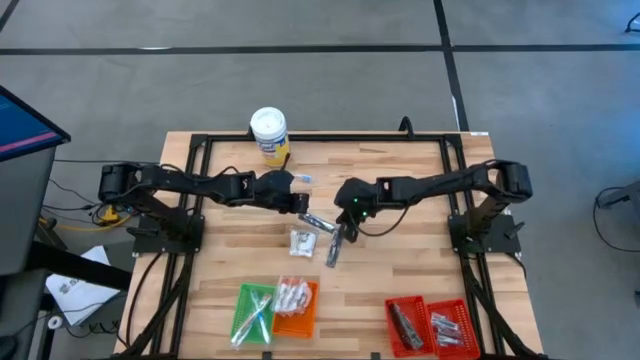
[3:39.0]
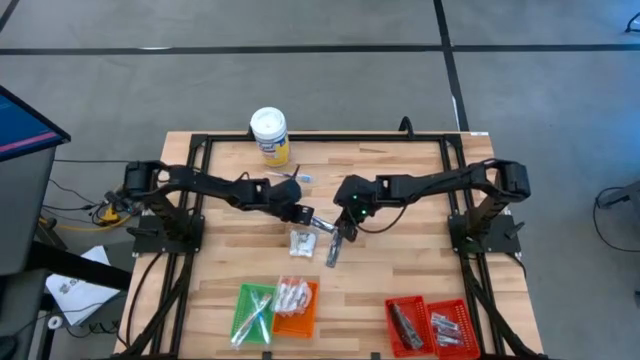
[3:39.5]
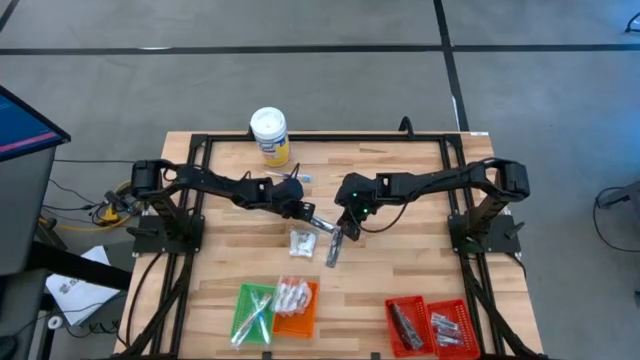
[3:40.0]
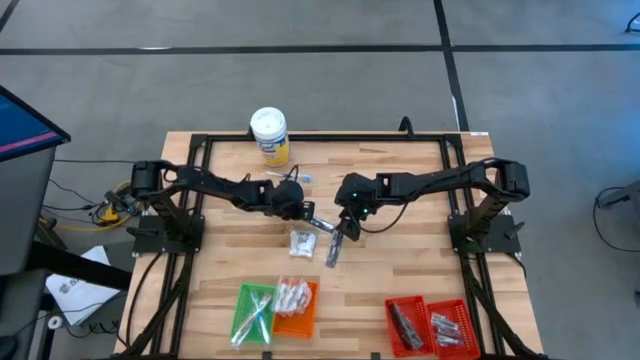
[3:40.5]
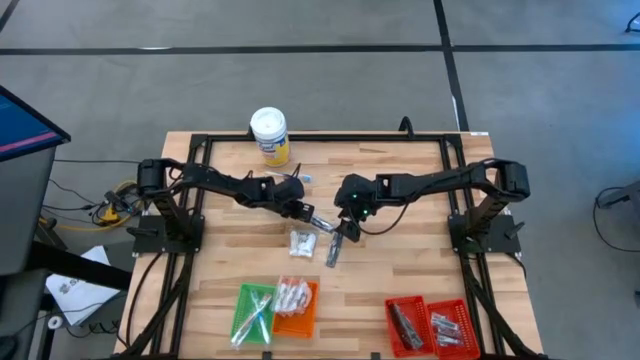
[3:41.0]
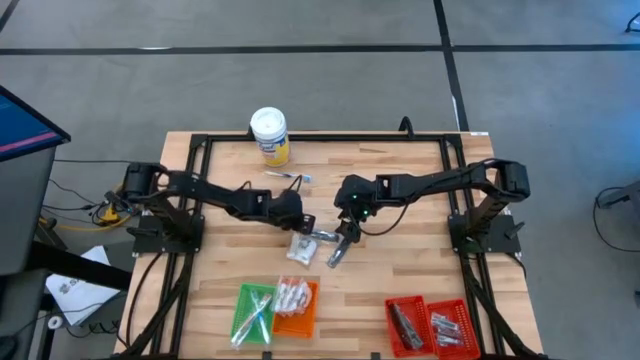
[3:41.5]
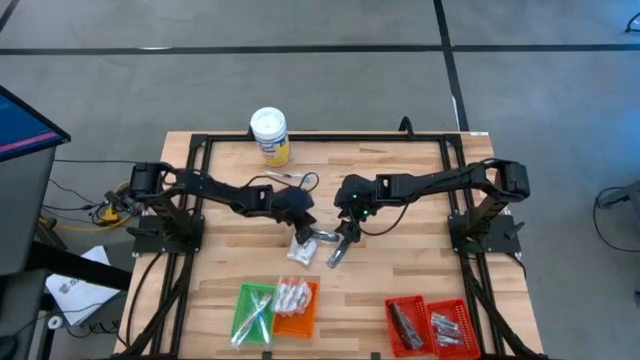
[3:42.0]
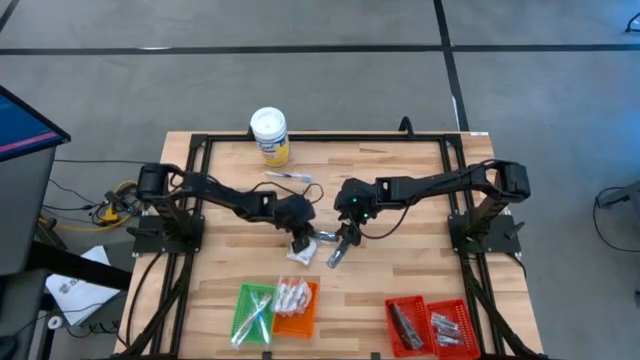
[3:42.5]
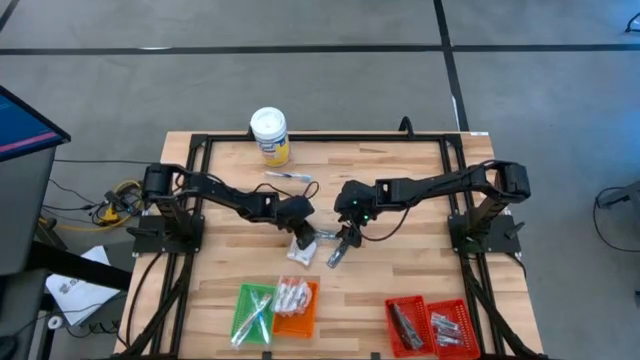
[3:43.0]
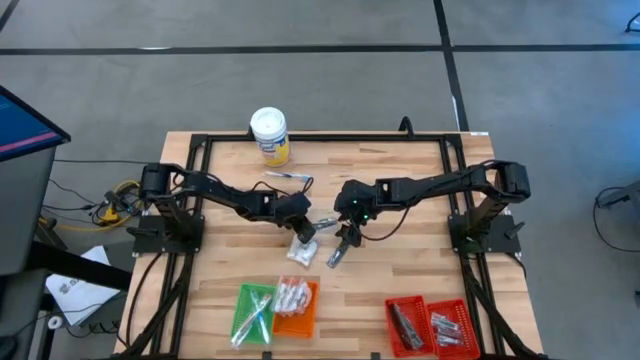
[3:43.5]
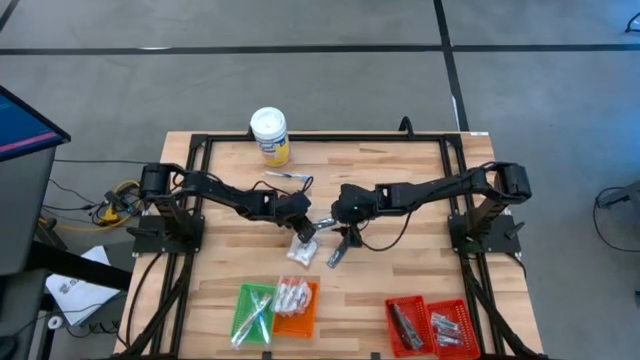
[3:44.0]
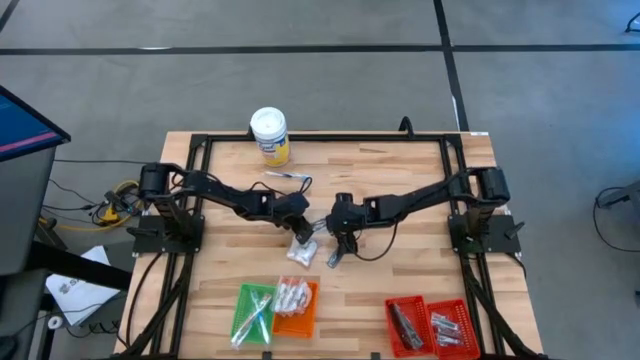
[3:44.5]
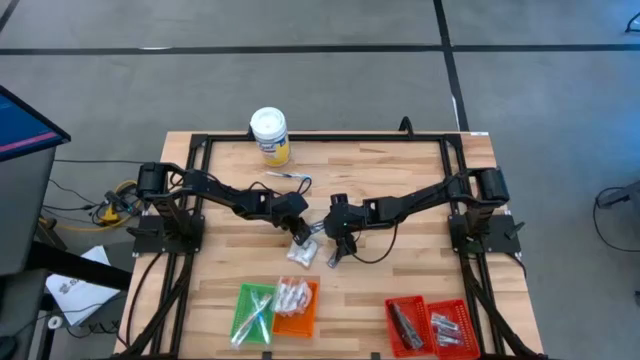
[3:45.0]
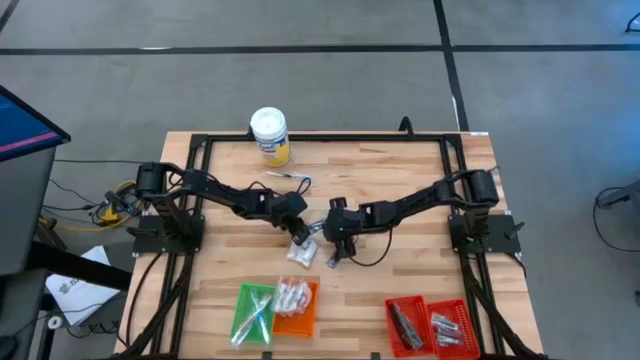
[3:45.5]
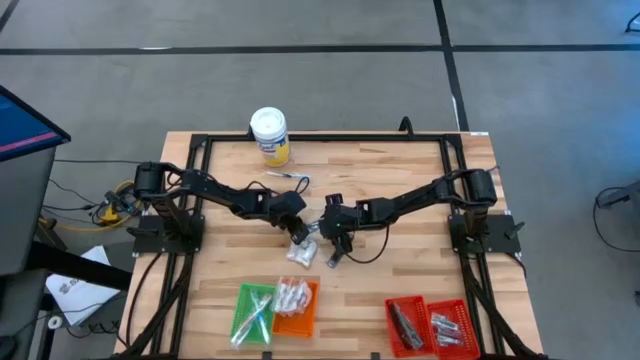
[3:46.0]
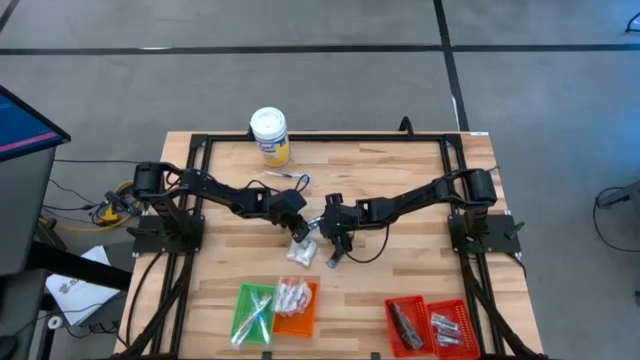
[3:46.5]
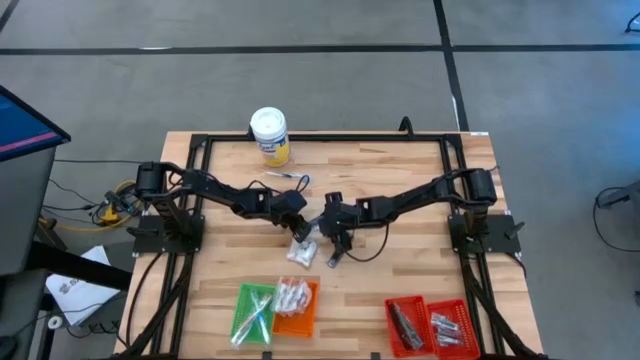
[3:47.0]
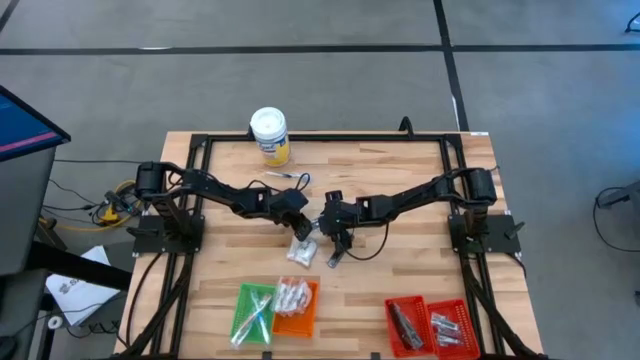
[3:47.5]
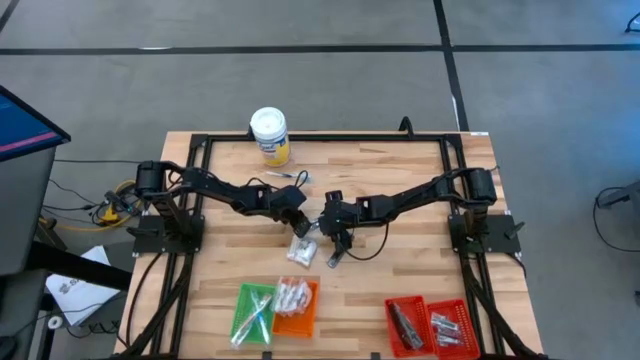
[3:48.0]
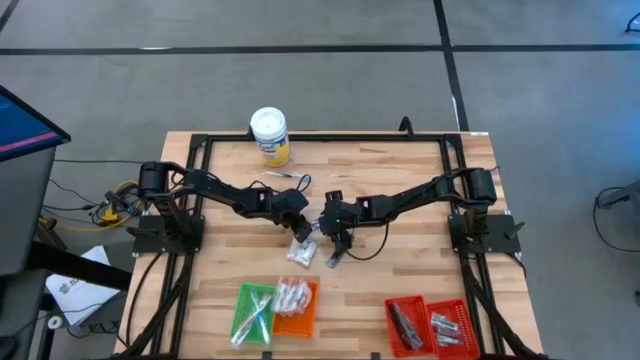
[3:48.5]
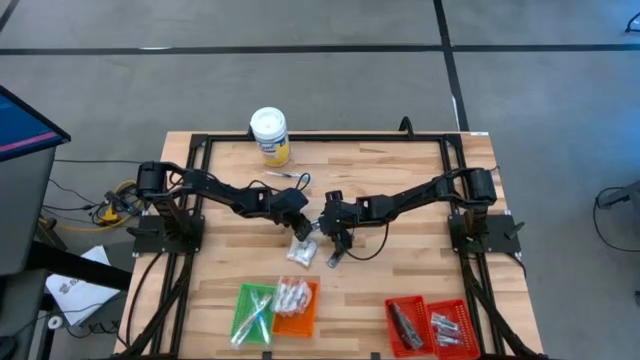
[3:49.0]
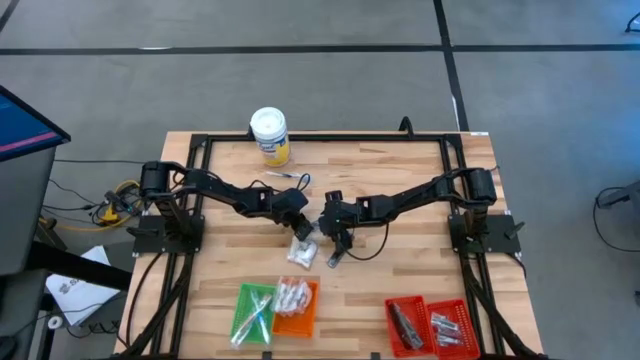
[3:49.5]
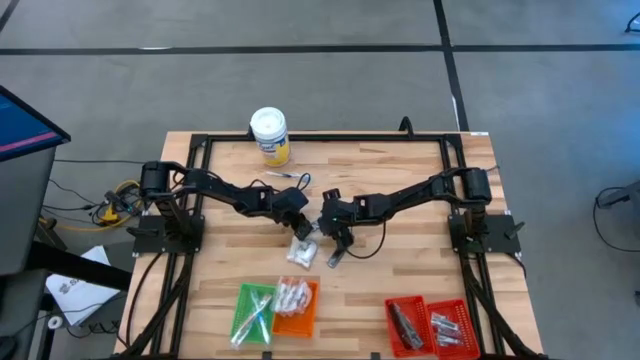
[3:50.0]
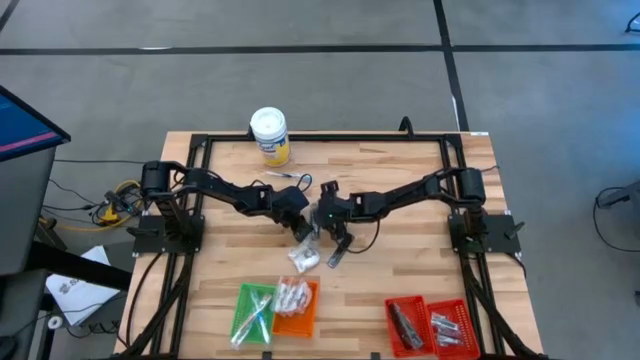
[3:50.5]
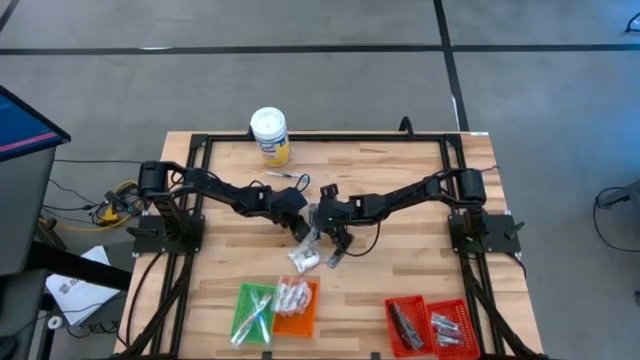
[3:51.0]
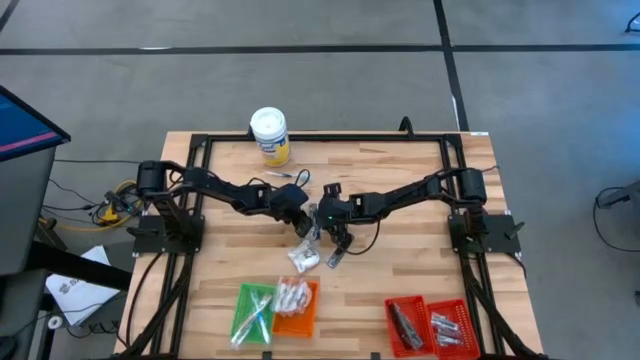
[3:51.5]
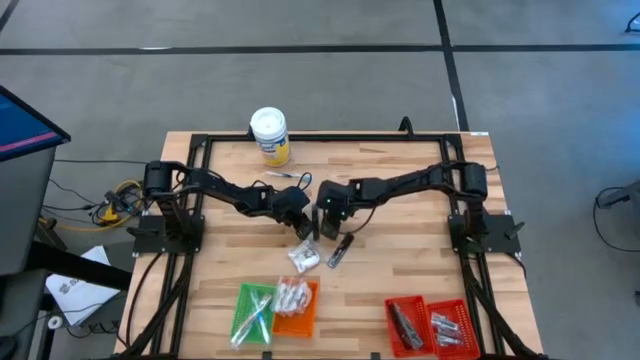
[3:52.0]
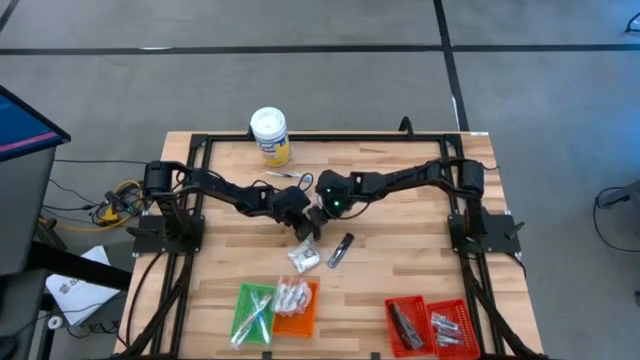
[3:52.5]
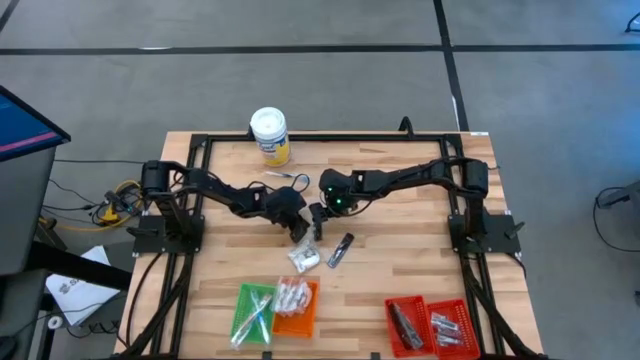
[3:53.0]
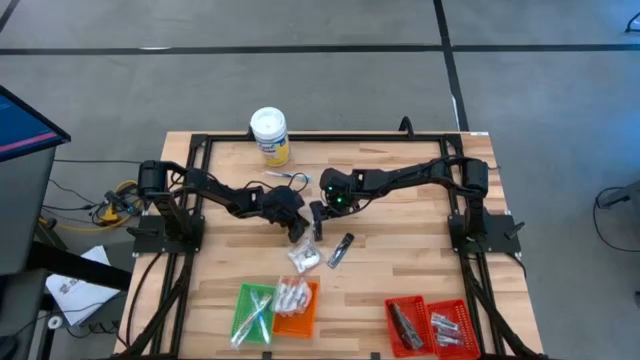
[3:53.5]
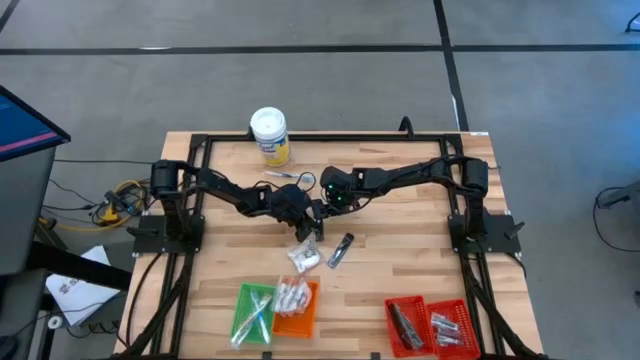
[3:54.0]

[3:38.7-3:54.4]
Task: Pick & Place Travel size toiletries
Put the black comb into the left red basket

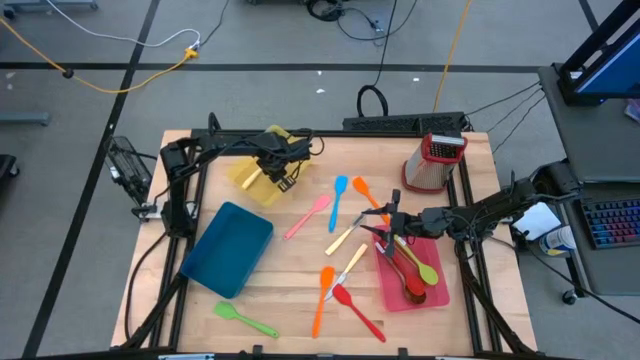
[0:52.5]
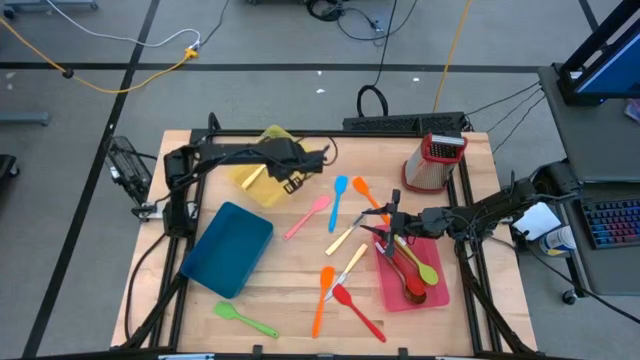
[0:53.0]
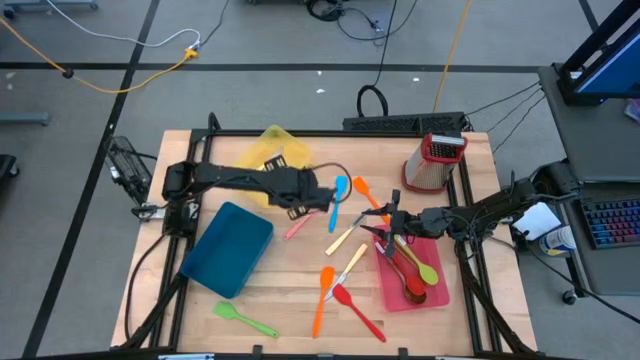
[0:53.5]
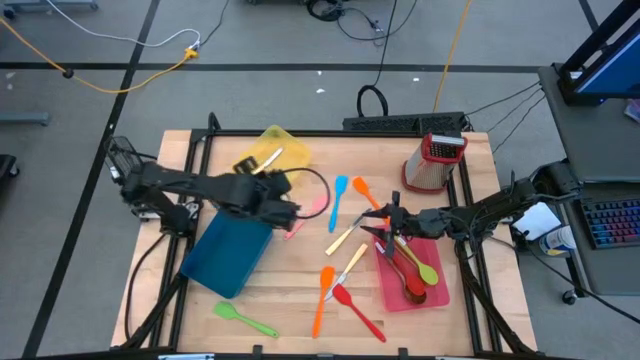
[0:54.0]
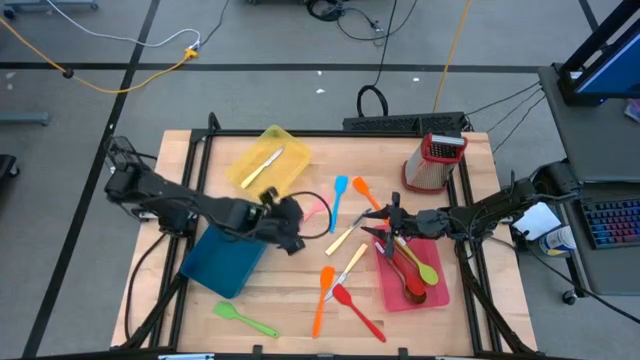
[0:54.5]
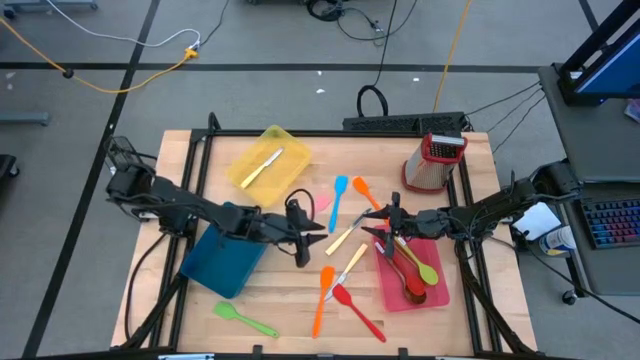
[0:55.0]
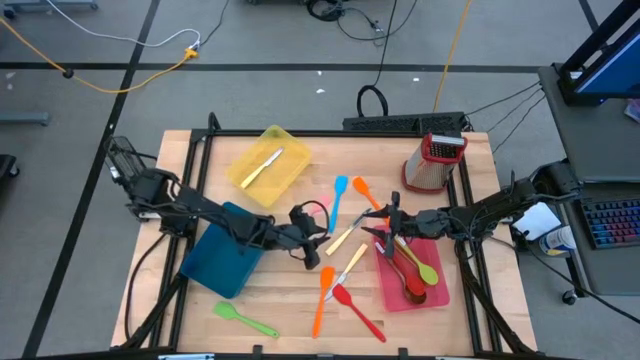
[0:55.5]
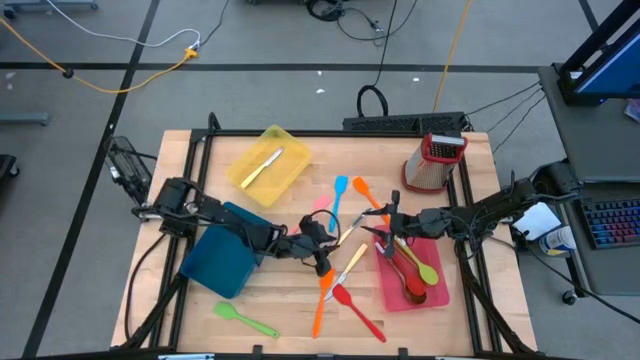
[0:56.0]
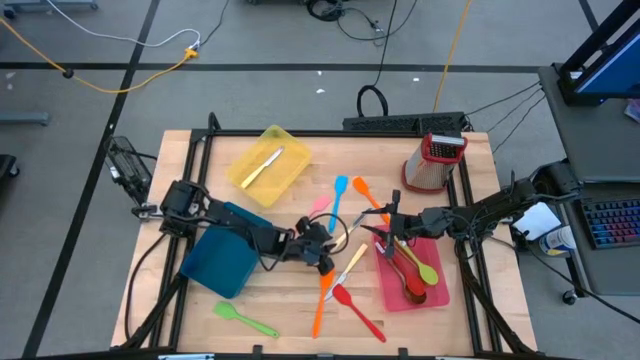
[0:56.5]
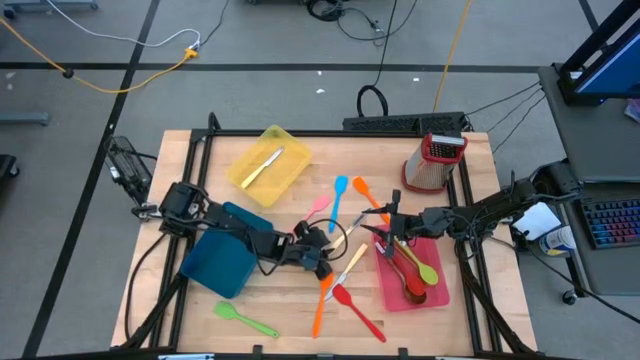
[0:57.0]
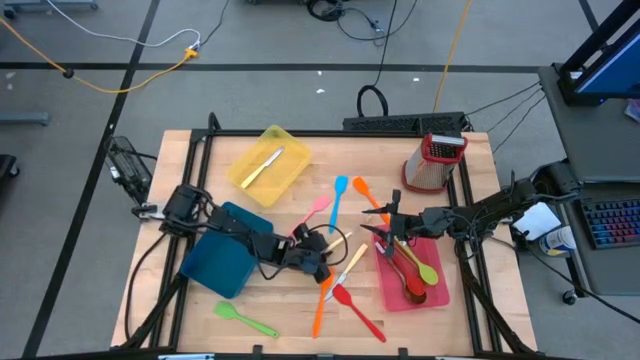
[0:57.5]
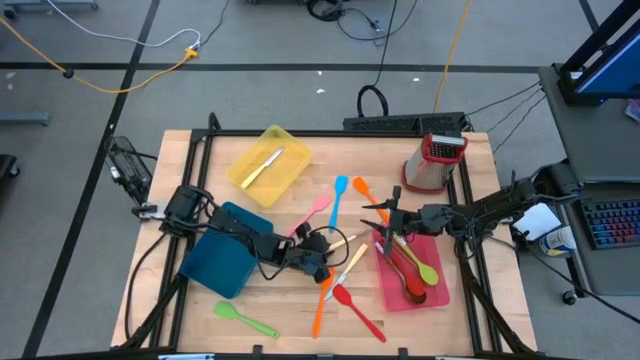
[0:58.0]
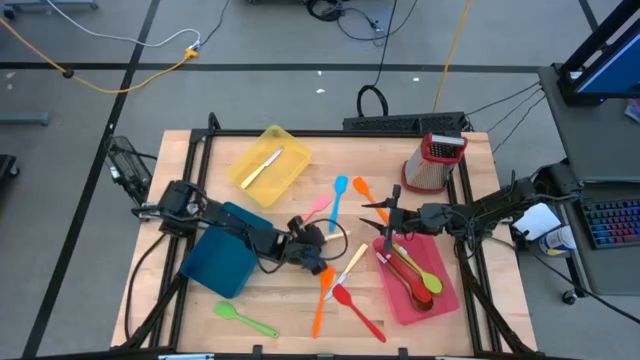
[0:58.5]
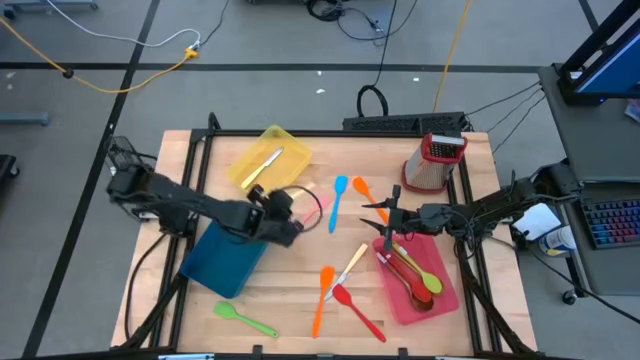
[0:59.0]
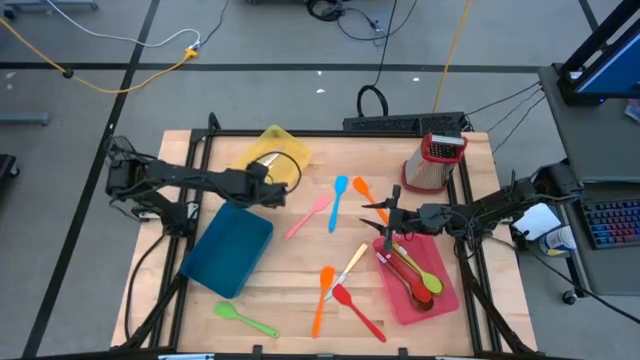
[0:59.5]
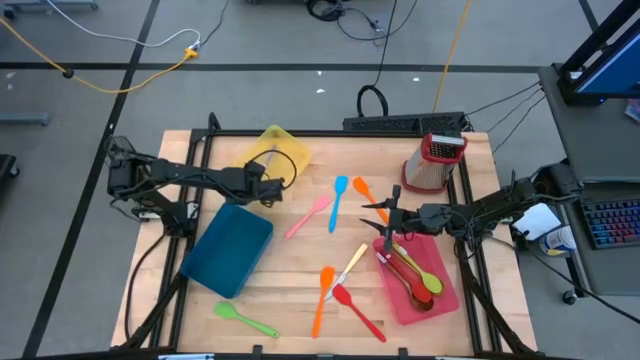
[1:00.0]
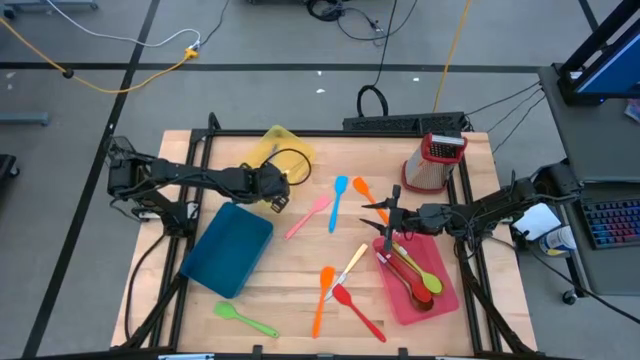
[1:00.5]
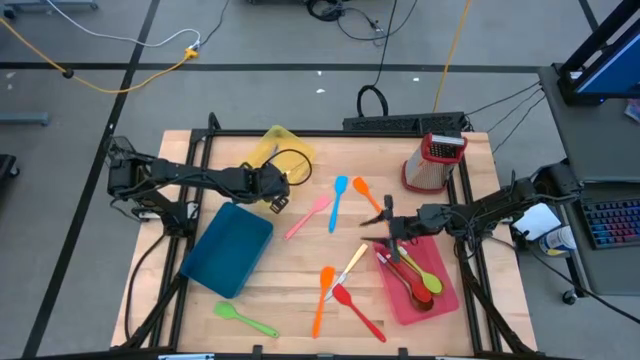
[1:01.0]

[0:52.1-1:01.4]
Task: Pick & Place Kitchen Items
Put the yellow knife into the yellow bin
